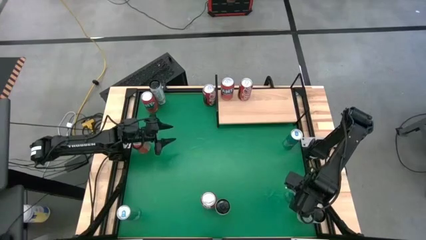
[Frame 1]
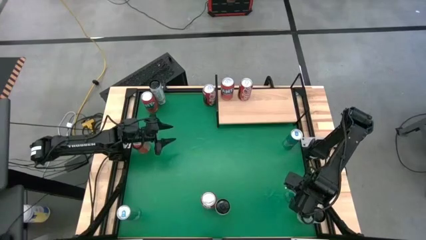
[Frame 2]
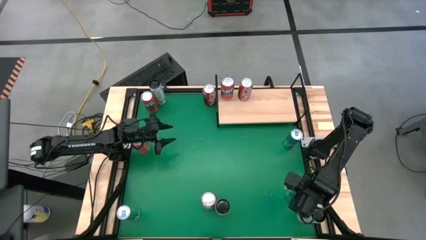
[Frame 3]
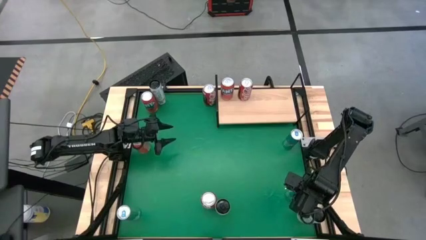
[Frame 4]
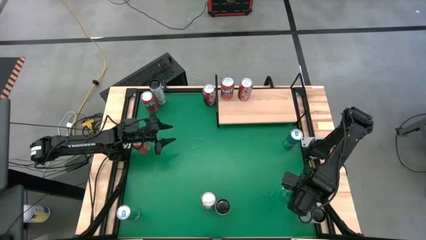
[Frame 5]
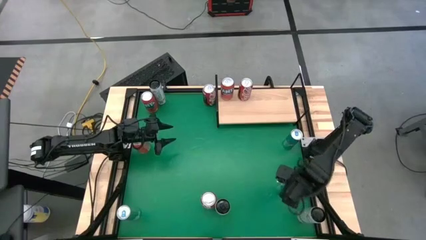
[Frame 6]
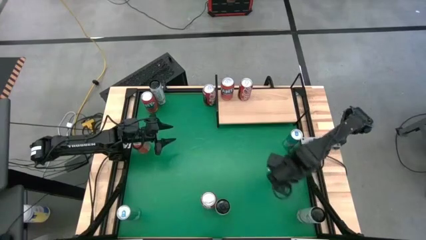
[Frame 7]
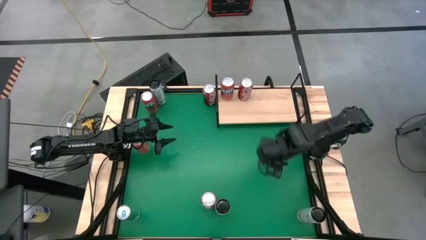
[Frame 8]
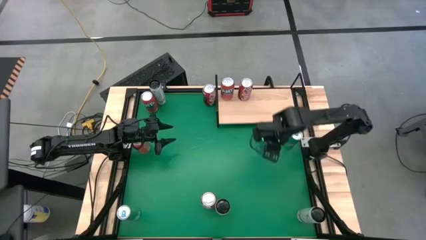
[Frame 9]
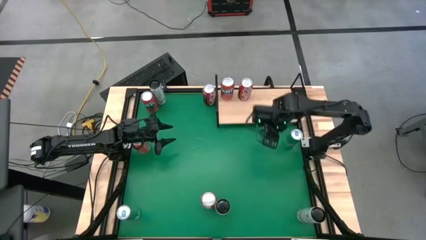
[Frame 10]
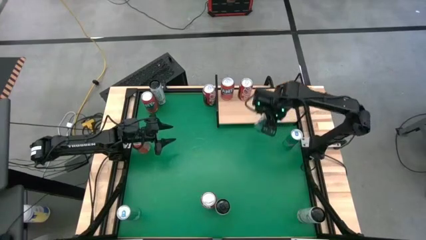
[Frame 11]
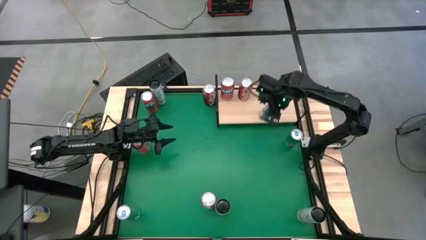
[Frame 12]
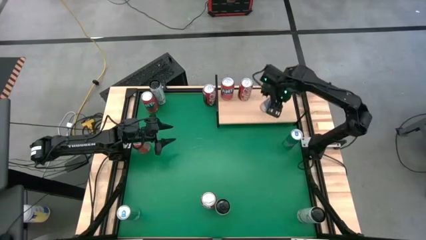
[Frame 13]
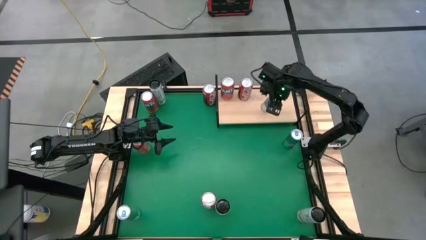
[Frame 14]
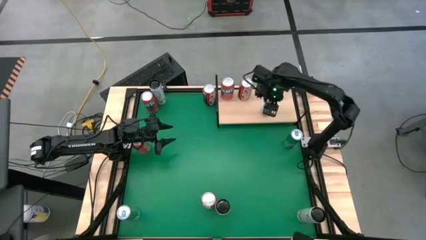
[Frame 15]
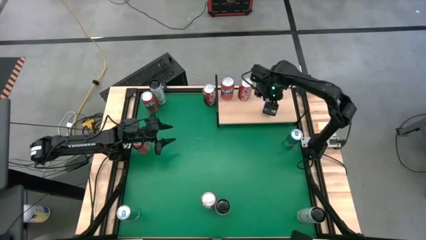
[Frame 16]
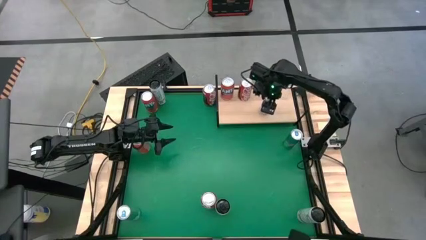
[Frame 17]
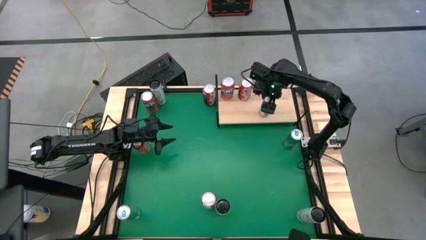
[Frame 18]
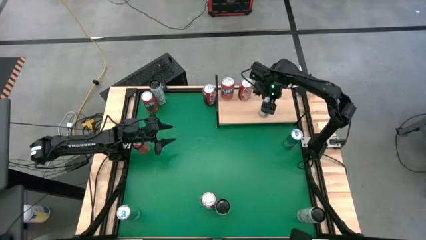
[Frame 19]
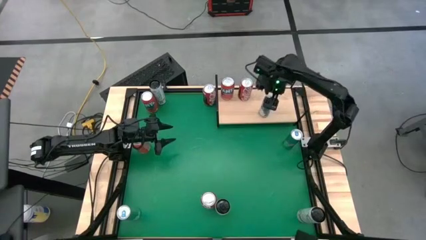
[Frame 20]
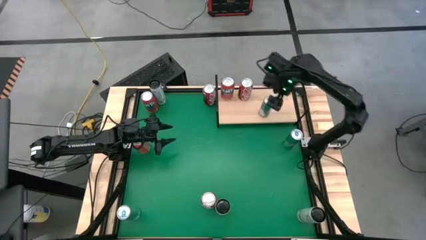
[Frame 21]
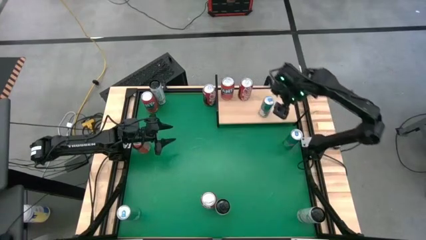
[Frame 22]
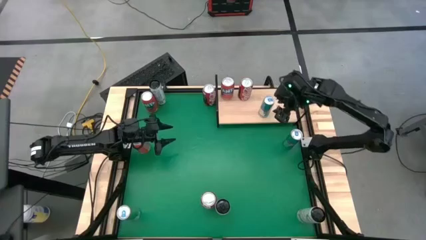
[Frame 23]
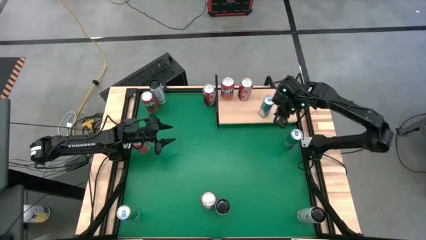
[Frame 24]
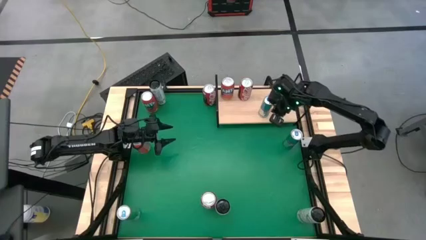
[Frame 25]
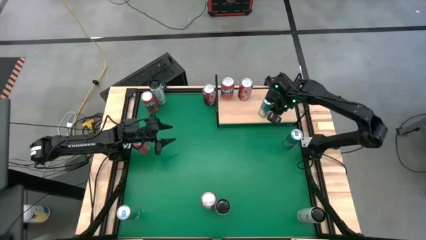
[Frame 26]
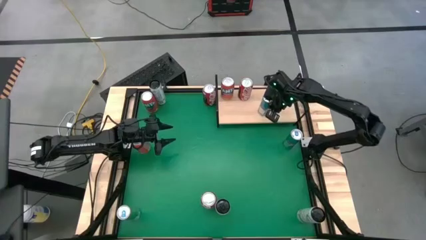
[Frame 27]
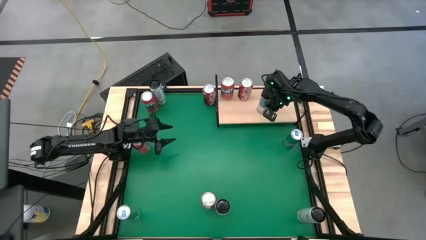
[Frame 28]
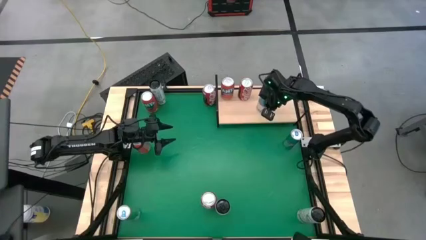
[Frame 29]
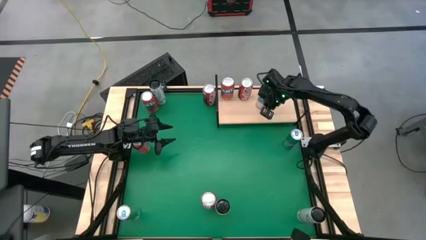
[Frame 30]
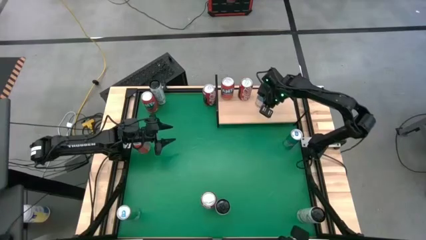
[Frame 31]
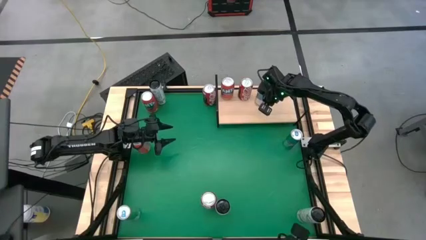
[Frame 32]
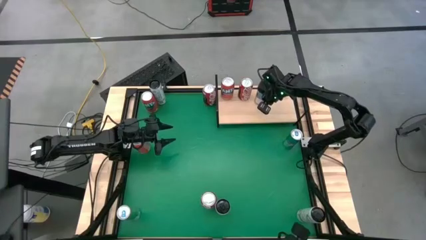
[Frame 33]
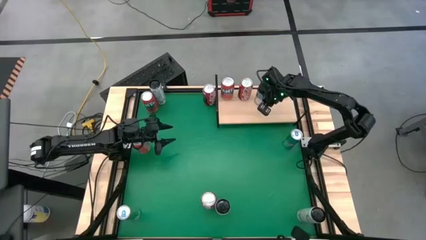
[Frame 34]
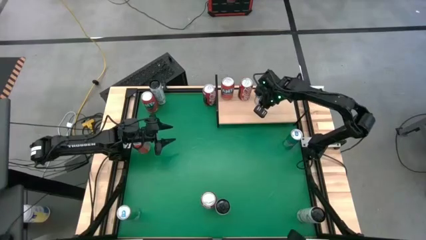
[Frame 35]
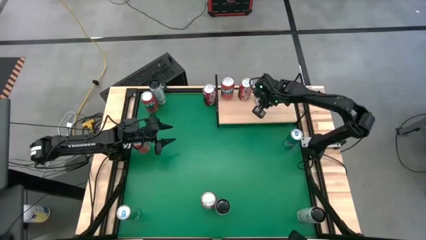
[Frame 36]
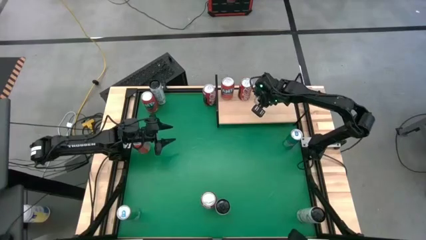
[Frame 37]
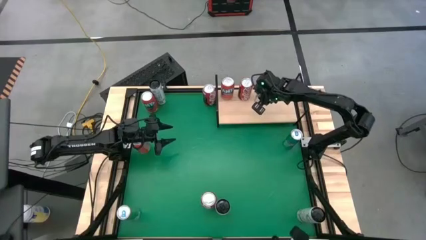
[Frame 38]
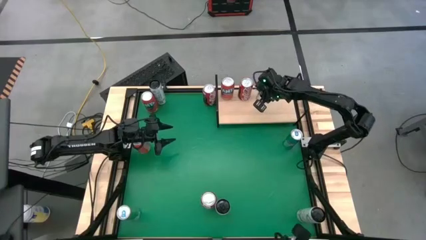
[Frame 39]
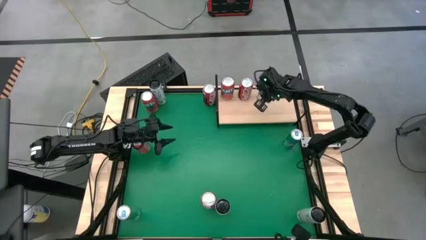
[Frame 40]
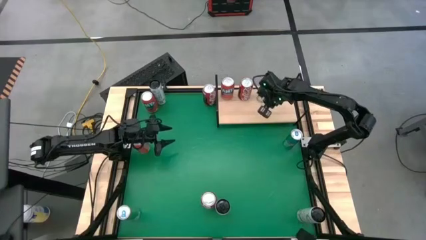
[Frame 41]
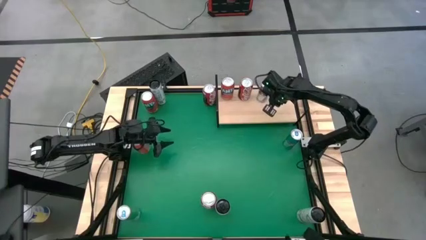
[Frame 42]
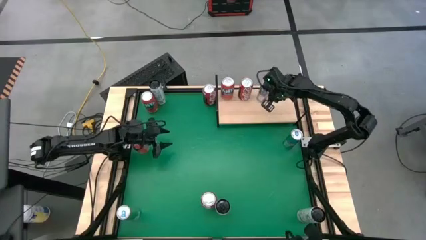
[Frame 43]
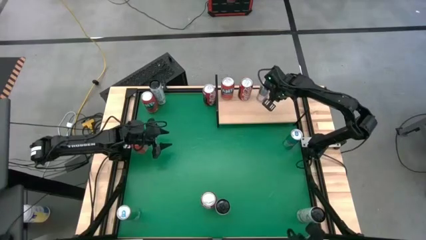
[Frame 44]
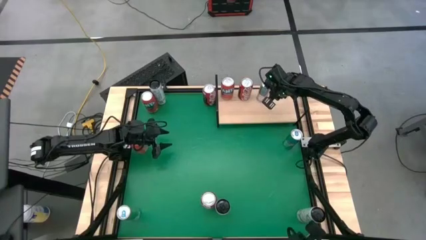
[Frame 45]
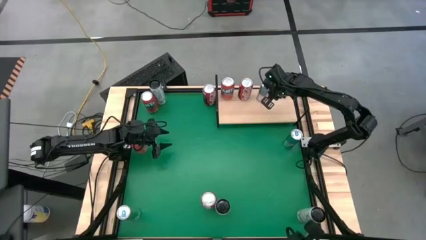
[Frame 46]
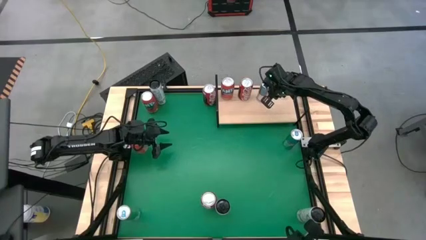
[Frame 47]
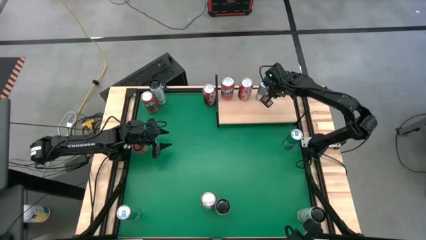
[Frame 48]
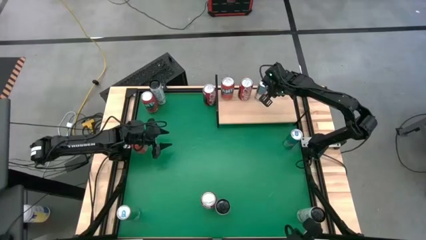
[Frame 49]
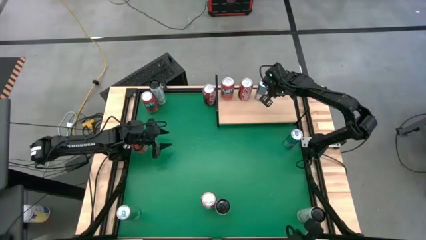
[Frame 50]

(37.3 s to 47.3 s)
Task: Place canned beverage on shelf
Put the bottom right blue soda can on the shelf
